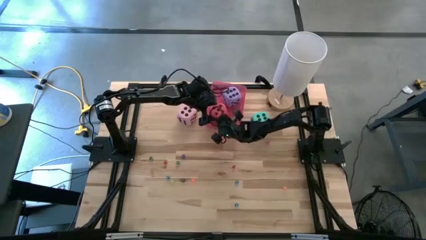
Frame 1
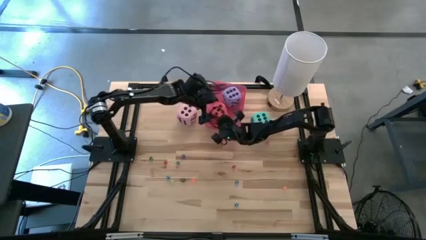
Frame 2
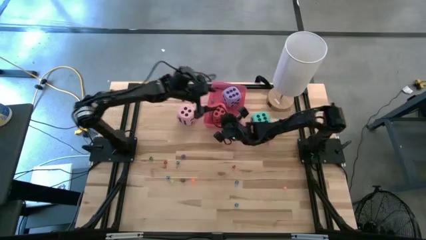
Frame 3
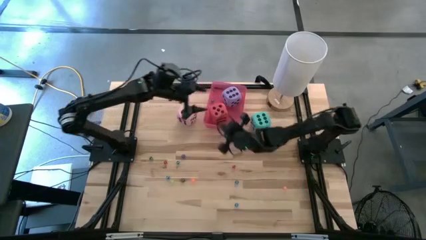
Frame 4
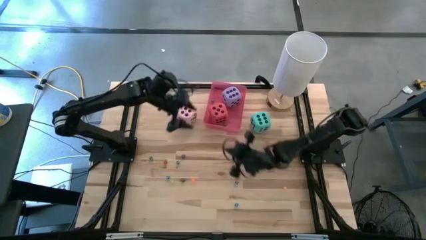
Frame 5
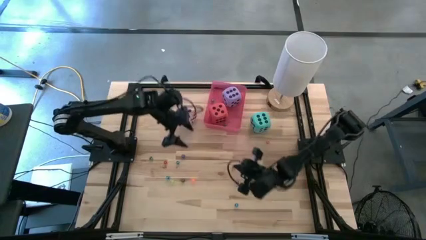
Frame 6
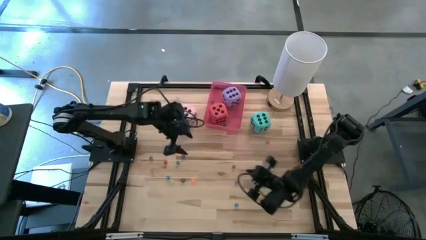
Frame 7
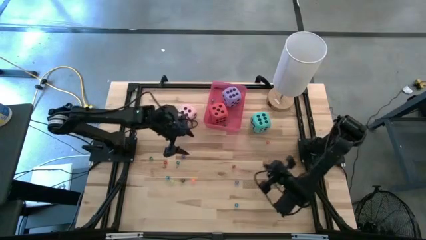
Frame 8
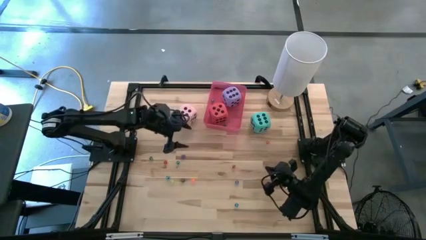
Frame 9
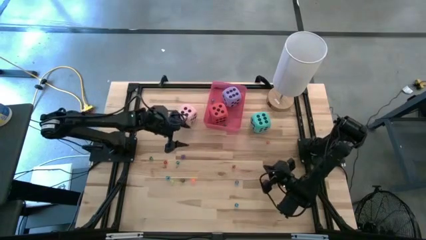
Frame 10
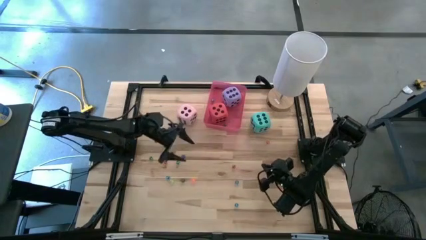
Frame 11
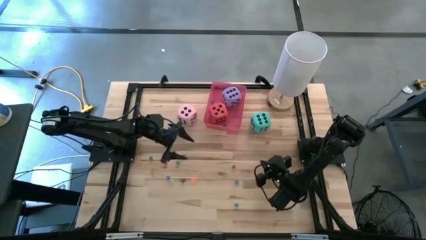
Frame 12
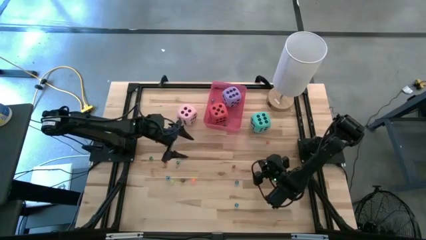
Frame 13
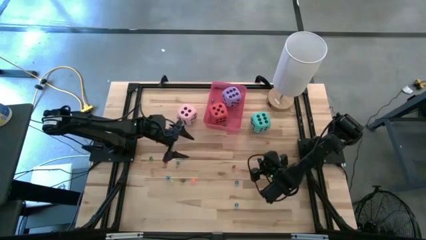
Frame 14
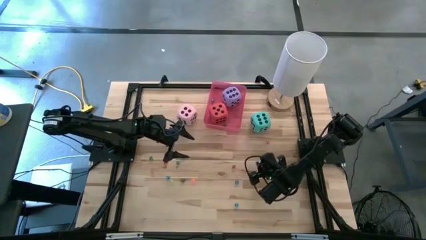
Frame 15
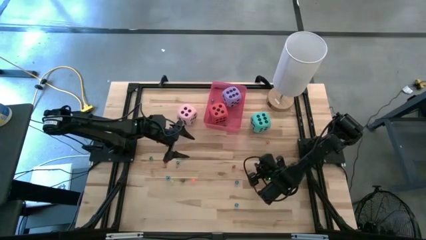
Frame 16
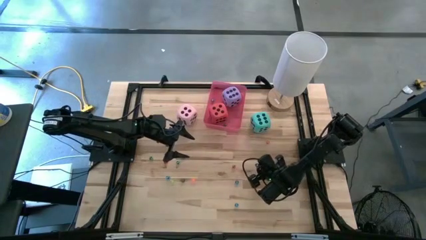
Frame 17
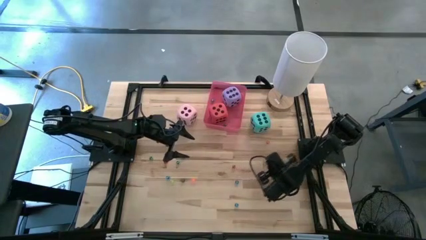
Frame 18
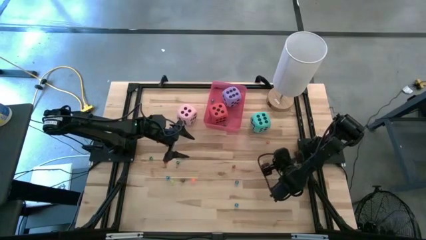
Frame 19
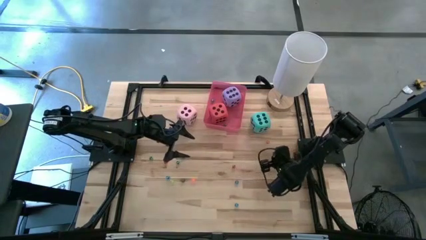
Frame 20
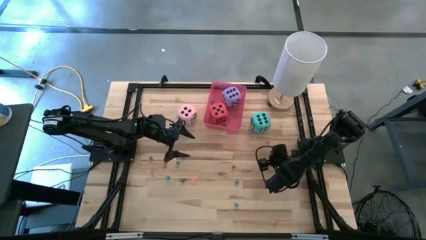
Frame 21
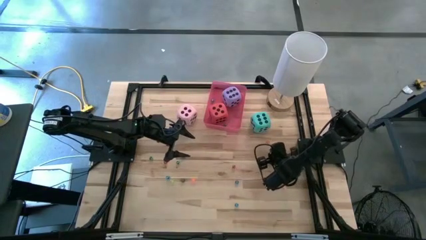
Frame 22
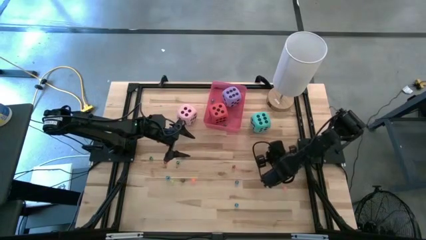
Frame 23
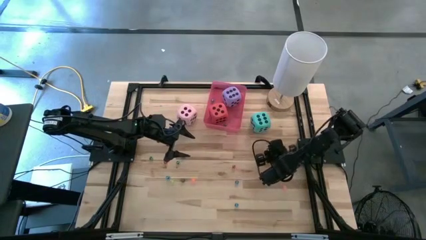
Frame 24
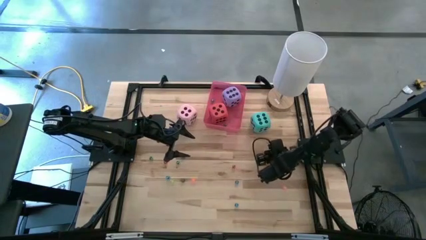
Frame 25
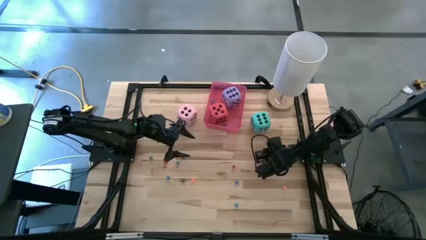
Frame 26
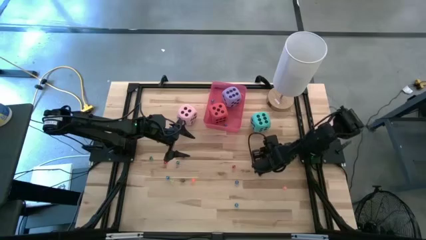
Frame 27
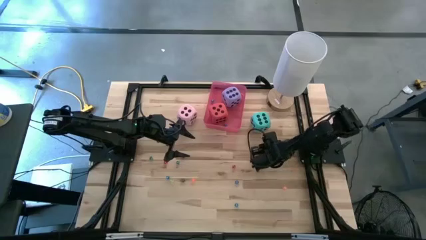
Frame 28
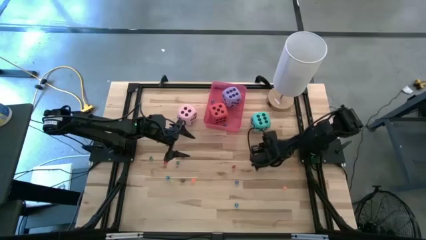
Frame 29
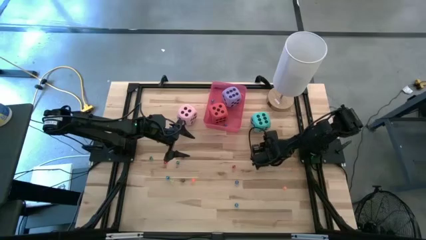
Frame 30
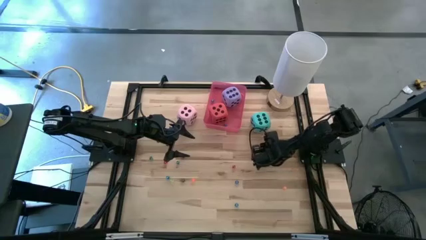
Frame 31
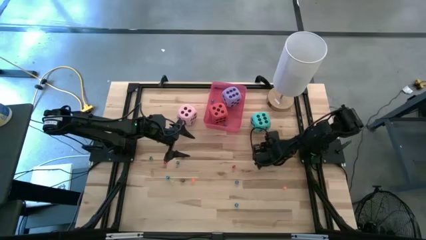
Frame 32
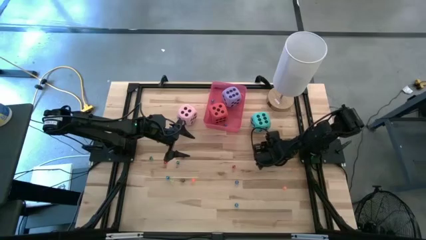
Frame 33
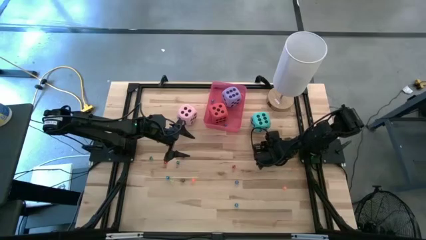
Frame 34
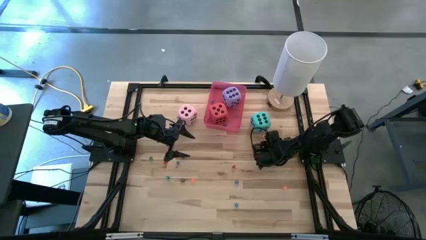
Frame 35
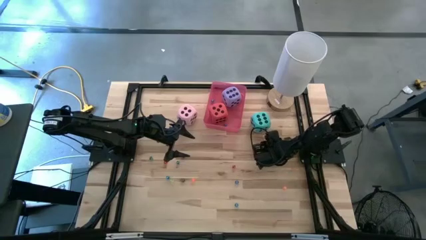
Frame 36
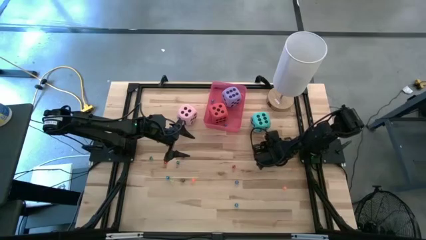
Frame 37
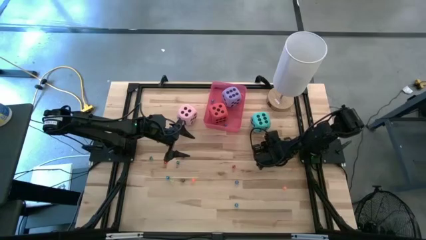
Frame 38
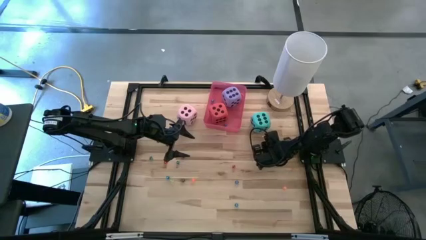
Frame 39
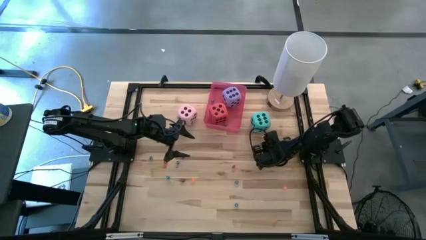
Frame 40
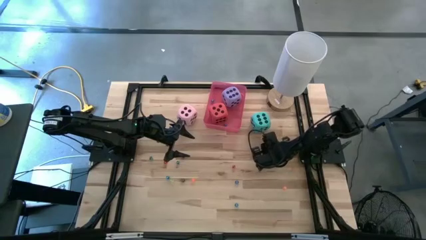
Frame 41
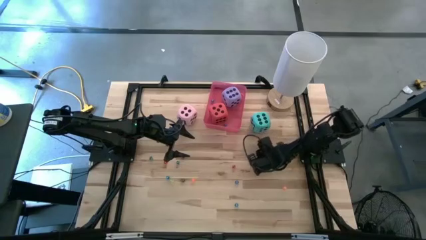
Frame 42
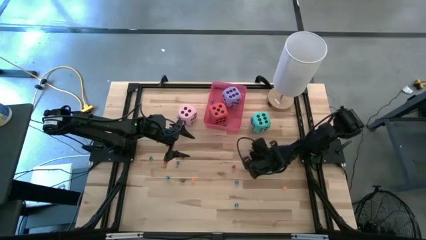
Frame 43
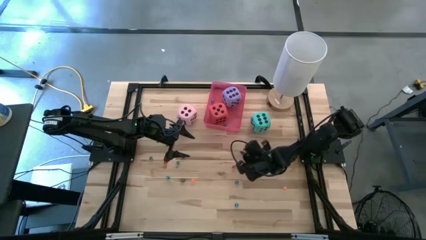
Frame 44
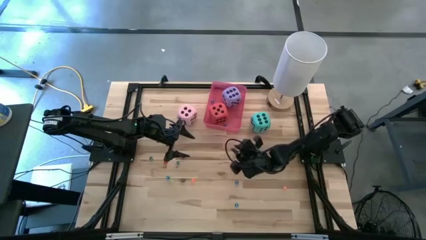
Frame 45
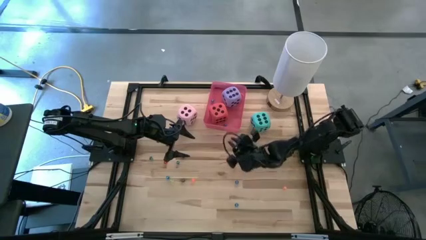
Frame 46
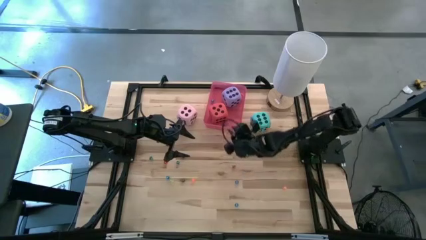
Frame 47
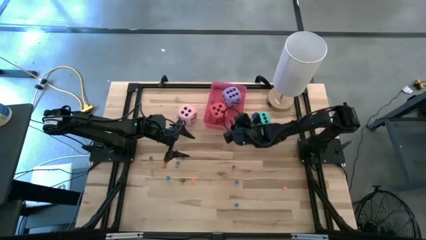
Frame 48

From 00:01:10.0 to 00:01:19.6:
Task: Pick & Place Dice
Put the right small red dice into the bin

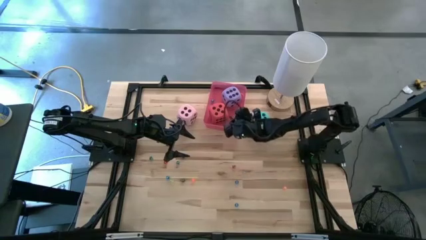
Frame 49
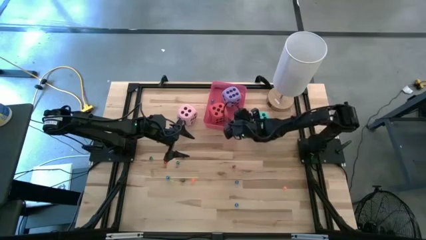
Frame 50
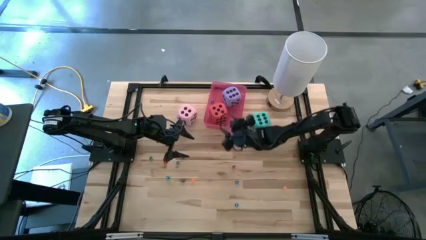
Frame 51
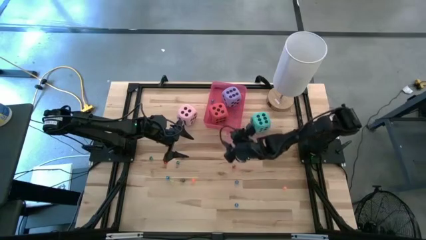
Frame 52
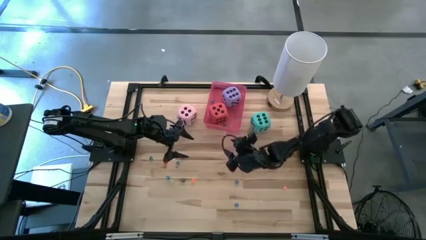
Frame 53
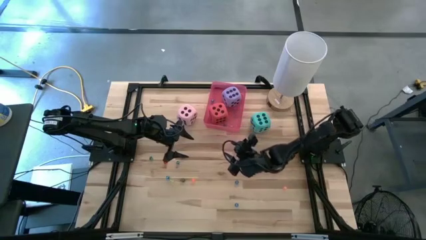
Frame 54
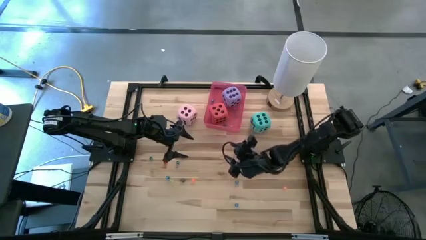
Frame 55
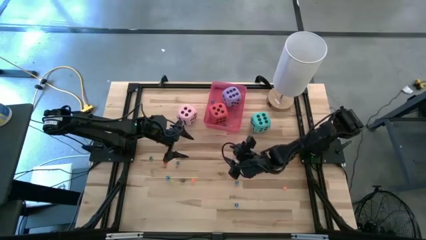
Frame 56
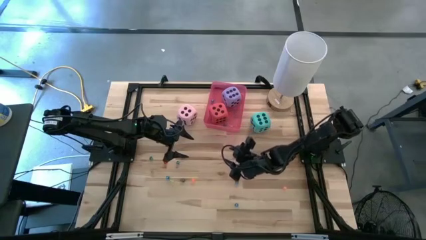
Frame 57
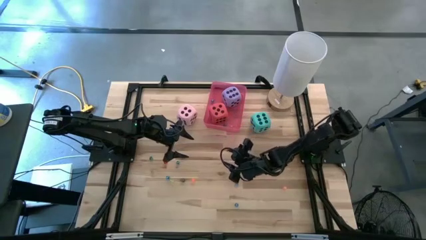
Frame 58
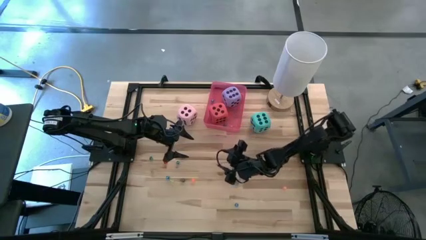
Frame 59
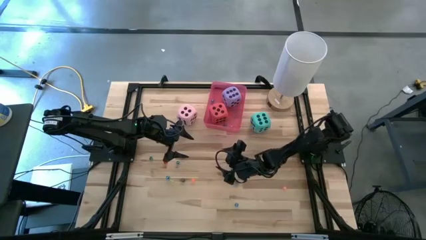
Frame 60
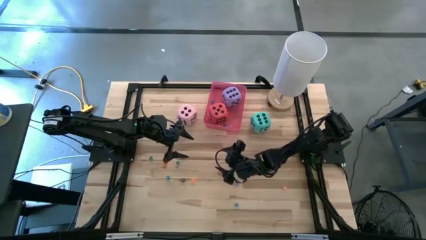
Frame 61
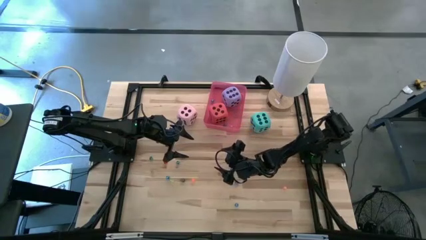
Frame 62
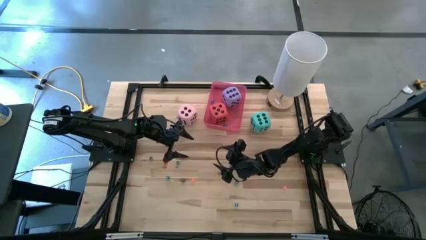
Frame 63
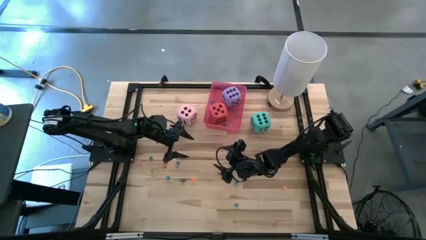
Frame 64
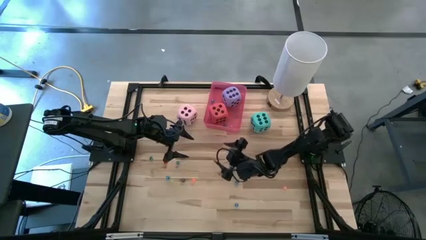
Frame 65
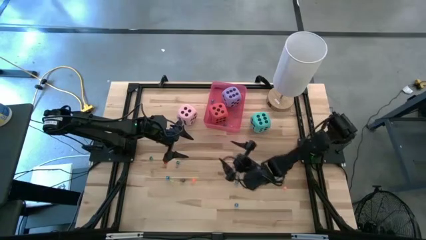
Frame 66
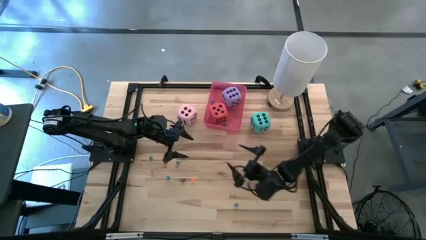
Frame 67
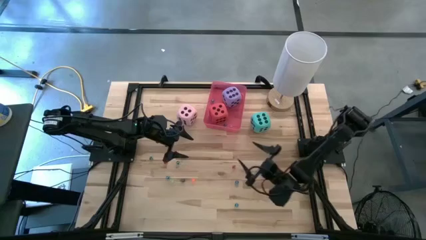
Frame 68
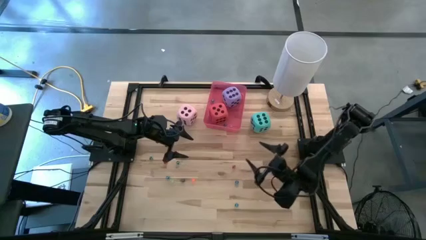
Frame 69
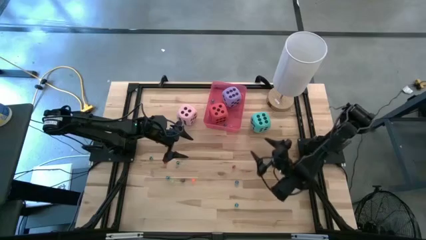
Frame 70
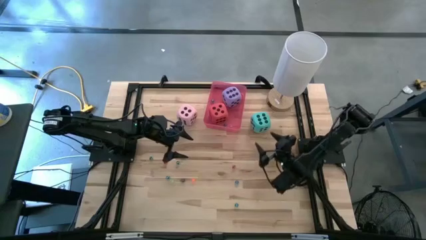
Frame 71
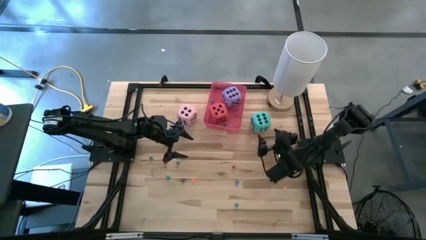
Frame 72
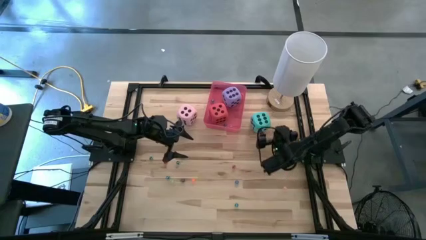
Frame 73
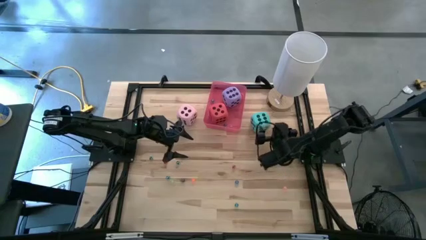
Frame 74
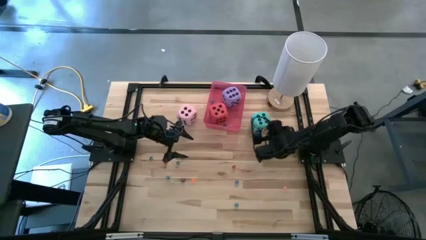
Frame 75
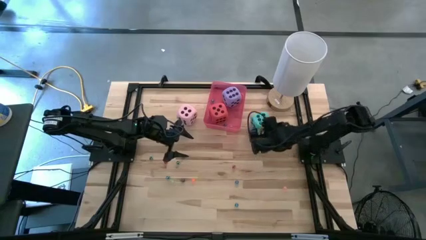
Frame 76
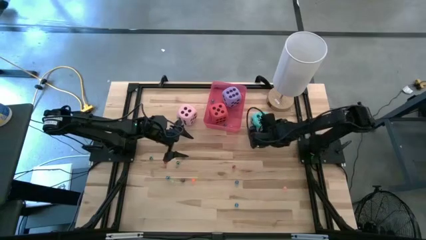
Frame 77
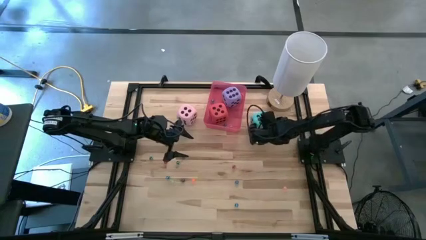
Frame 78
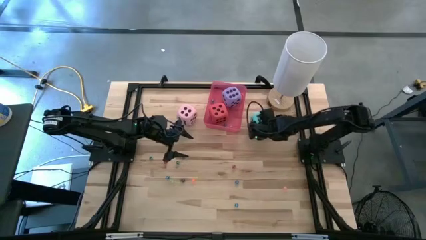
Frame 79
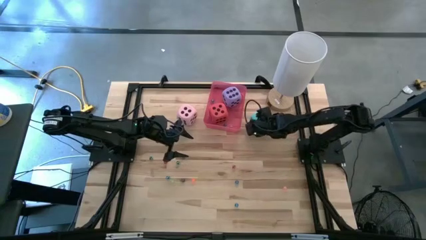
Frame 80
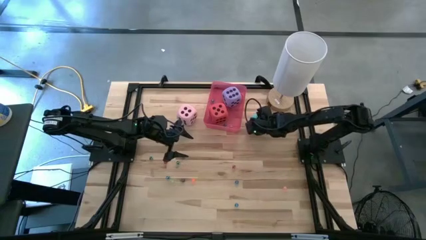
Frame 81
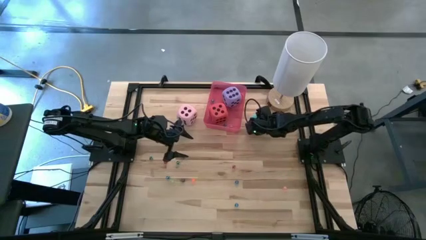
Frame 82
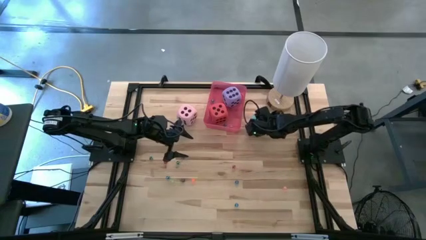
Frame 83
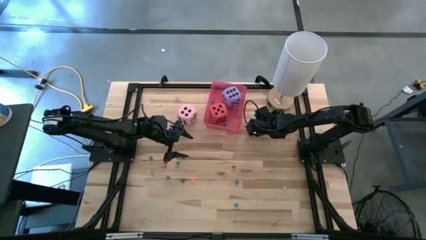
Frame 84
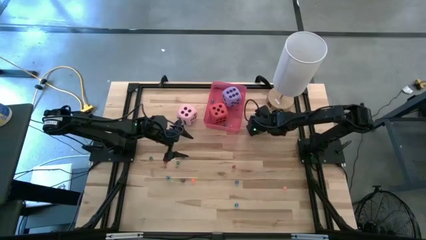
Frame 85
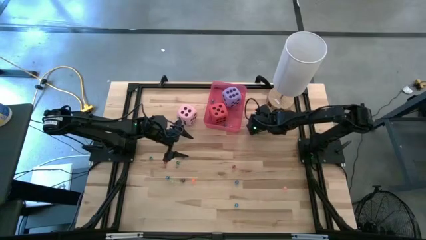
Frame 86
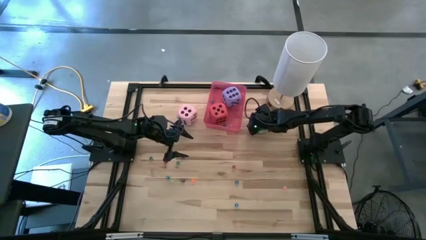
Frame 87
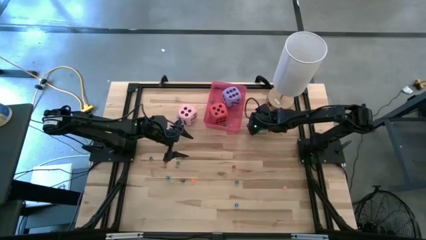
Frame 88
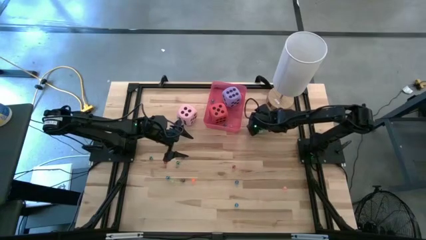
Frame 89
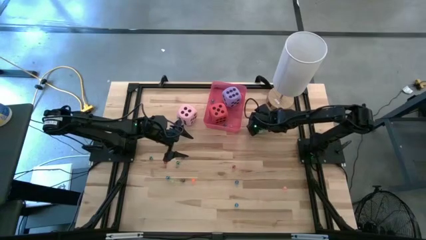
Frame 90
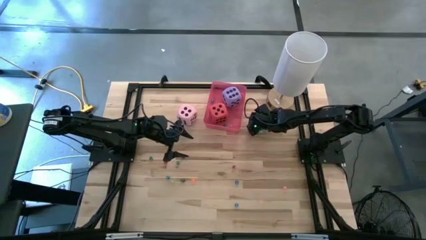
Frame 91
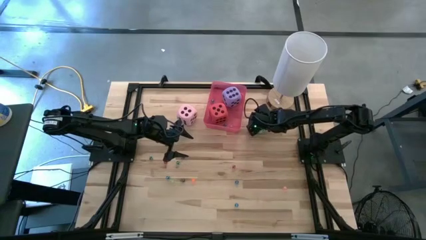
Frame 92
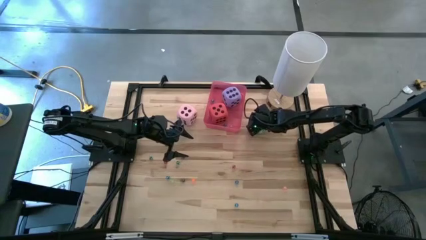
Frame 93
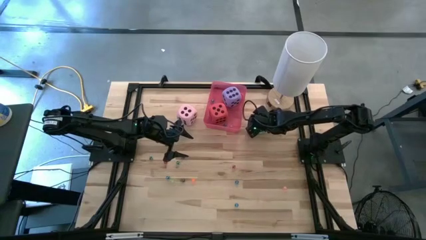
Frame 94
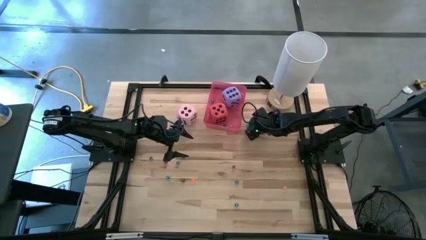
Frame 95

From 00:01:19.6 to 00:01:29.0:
Put the large blue dice into the bin
